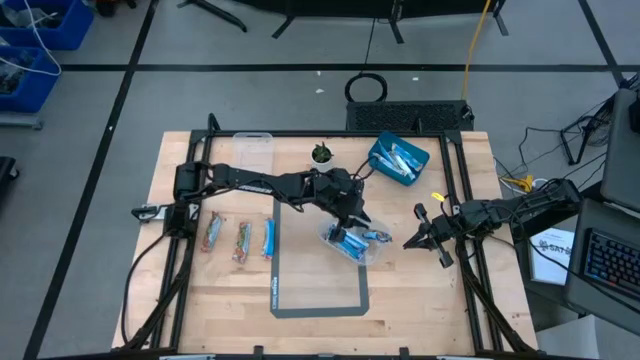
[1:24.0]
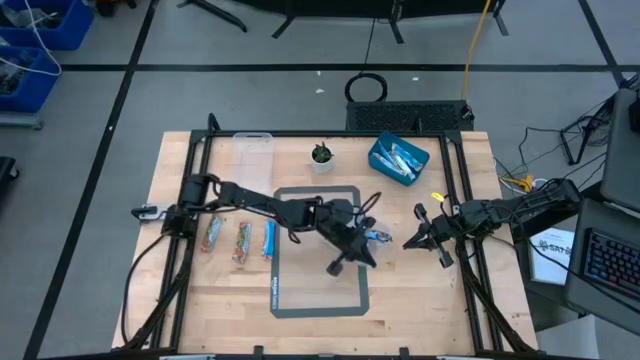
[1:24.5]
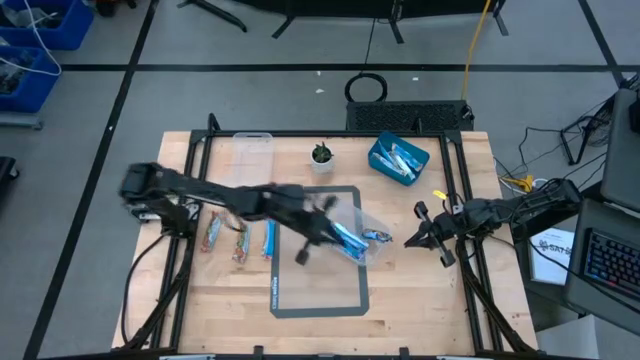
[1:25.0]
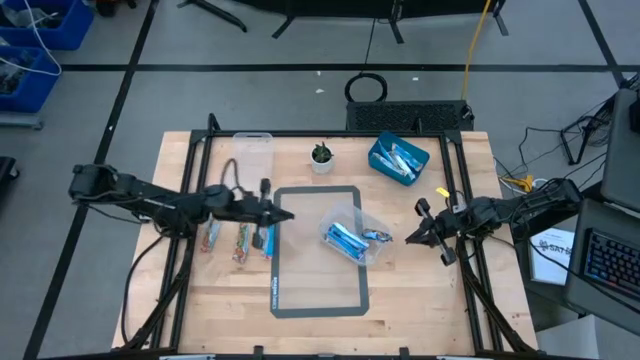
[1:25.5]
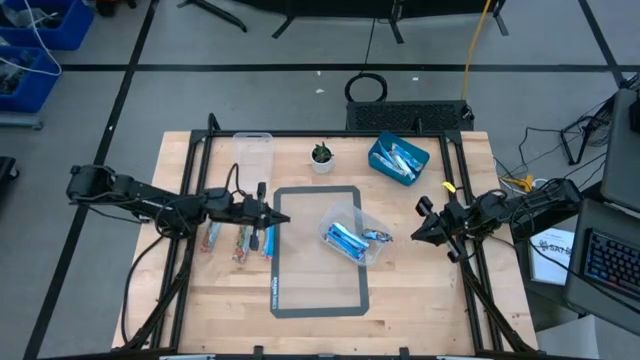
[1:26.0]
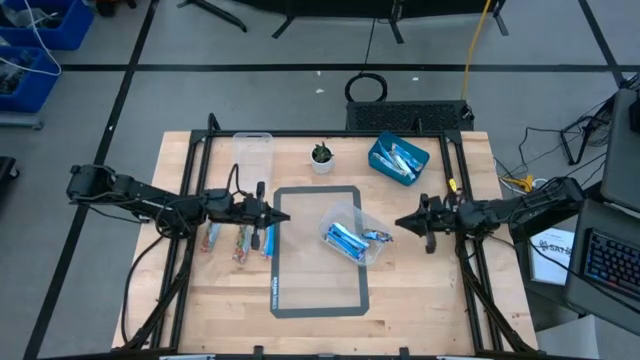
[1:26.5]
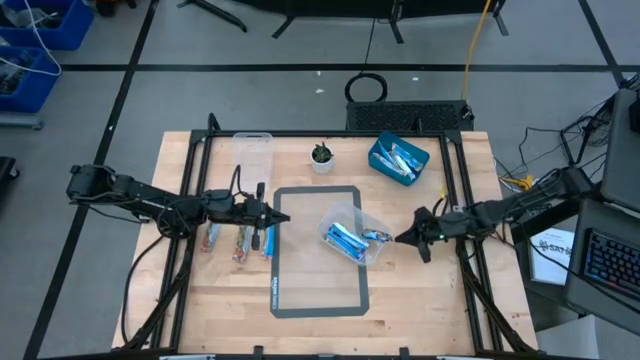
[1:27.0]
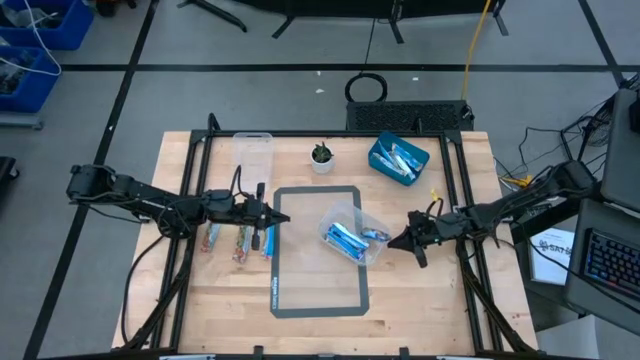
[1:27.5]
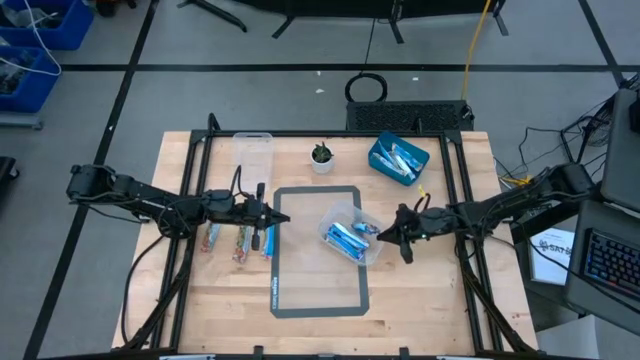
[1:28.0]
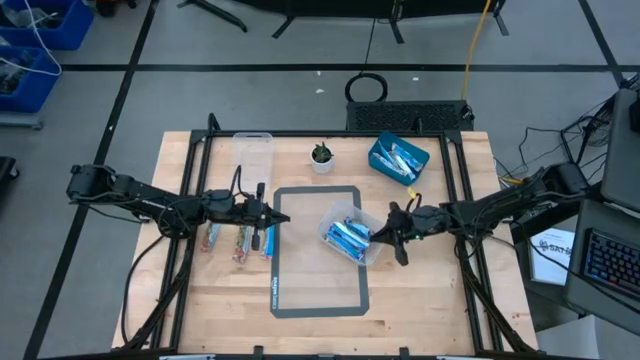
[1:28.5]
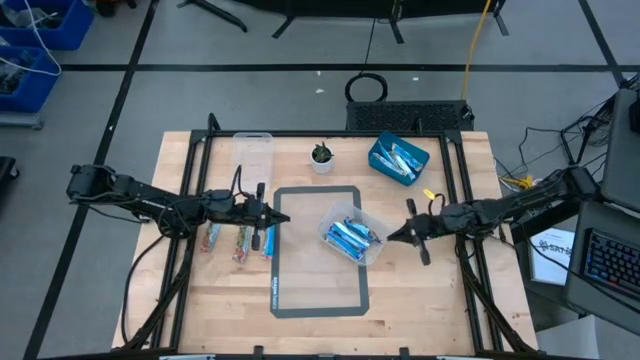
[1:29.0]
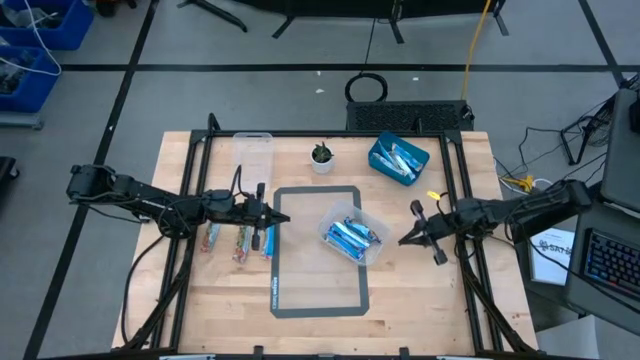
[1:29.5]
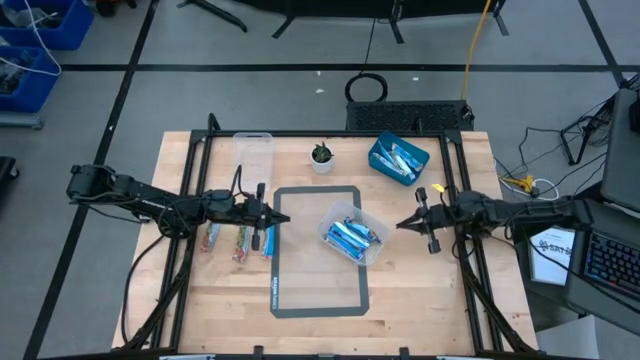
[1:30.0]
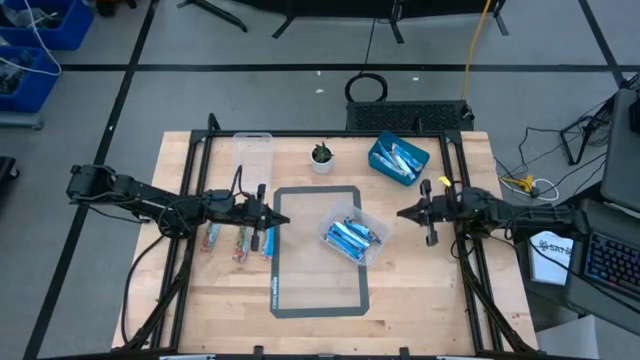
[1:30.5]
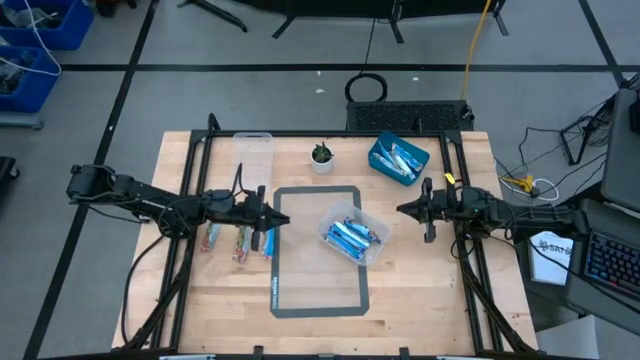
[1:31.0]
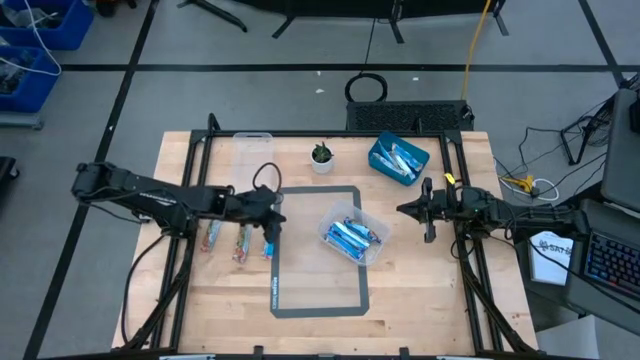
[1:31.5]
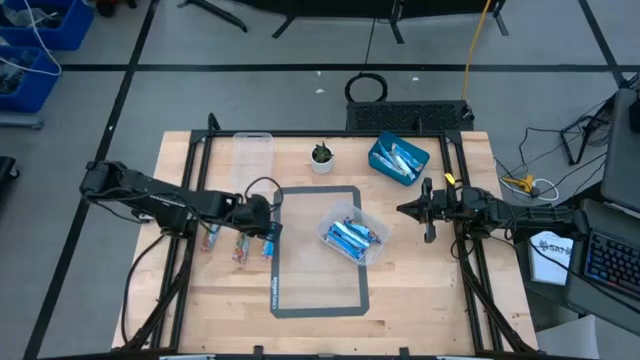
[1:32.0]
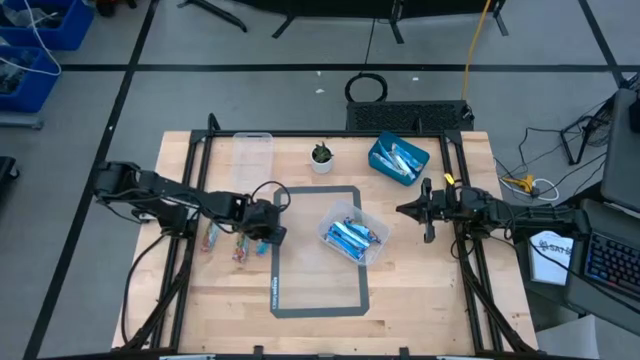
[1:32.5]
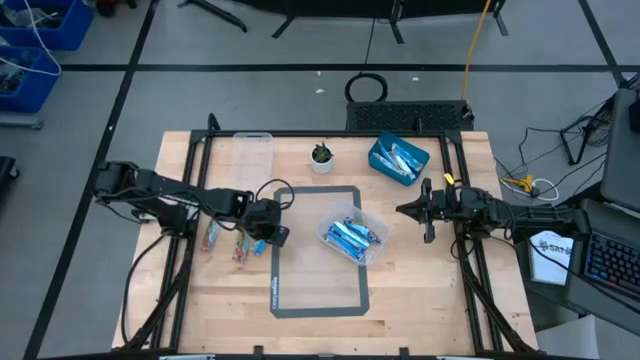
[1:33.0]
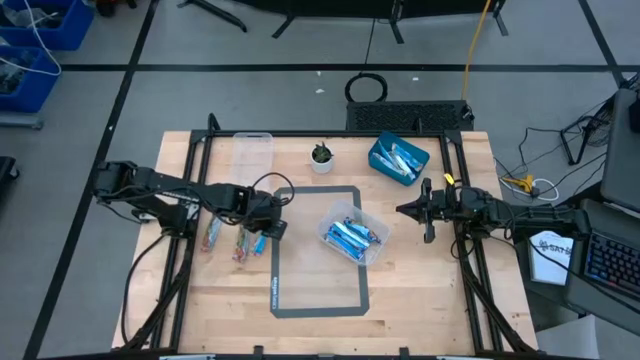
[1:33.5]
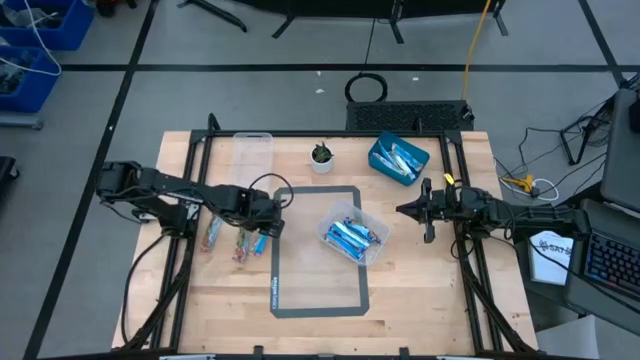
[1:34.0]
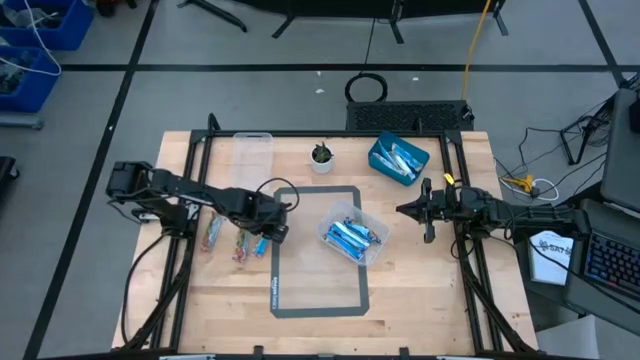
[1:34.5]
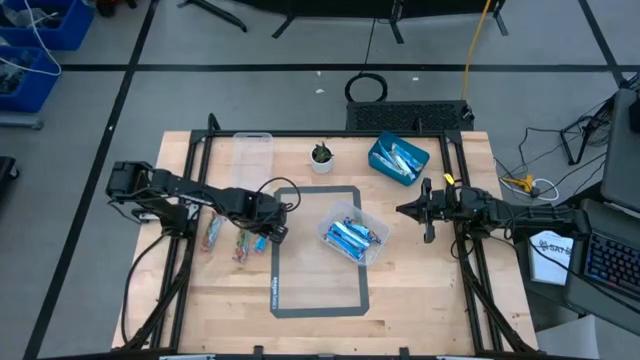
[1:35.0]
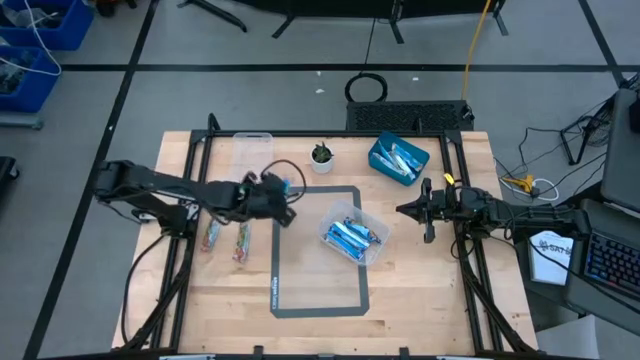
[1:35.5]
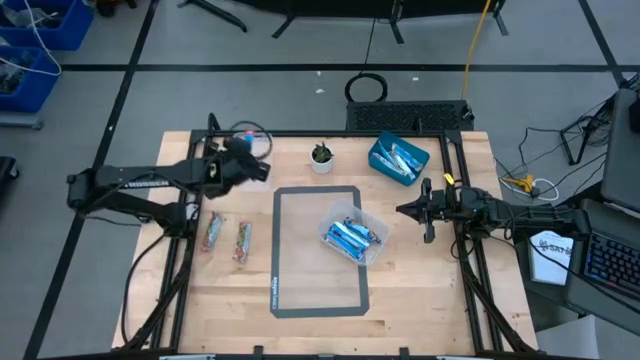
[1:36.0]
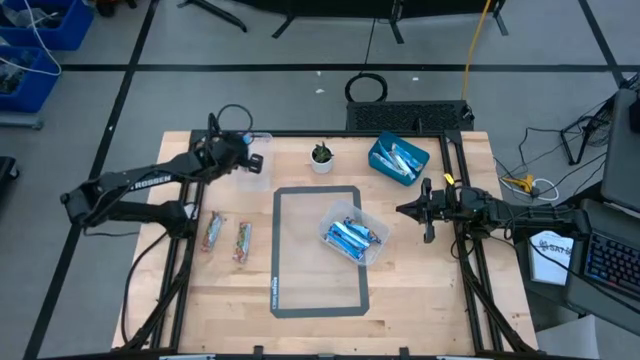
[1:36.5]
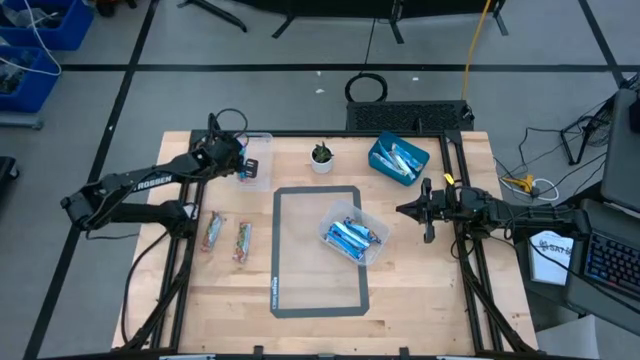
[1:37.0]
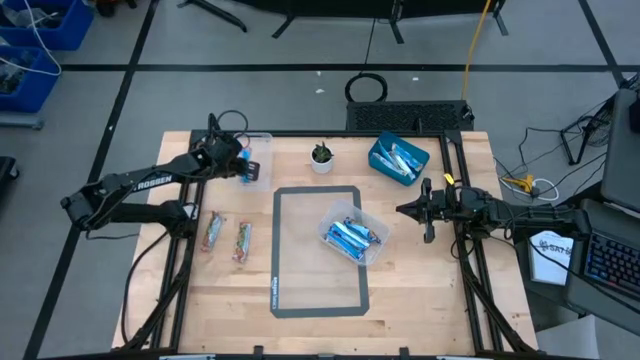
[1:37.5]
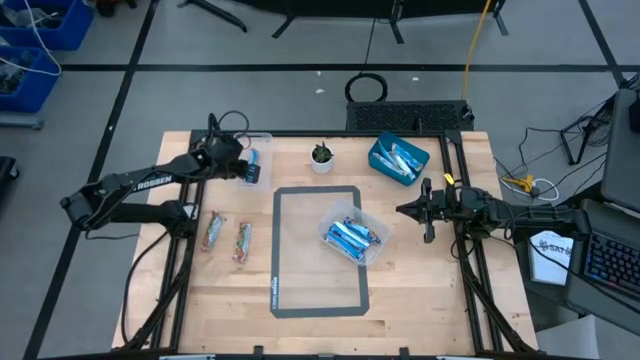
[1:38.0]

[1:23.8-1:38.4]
Task: Pick and place Granola Bars by type
Put the snack into the left bin

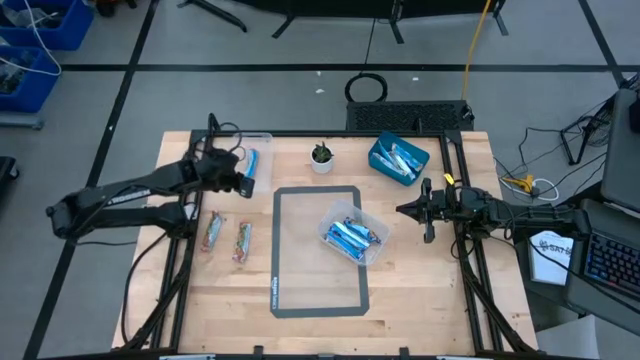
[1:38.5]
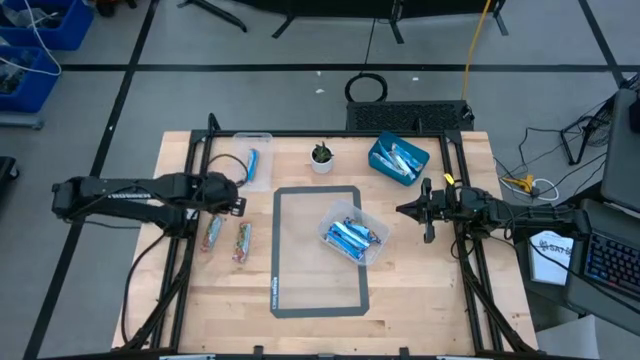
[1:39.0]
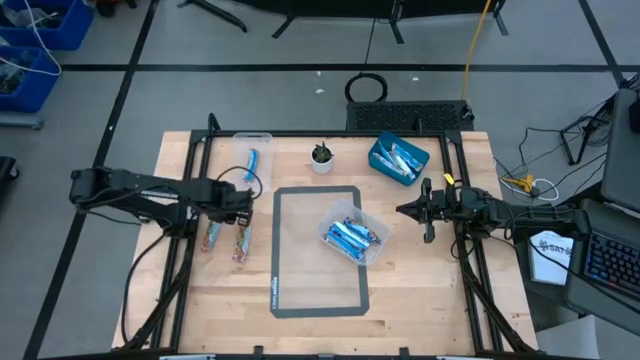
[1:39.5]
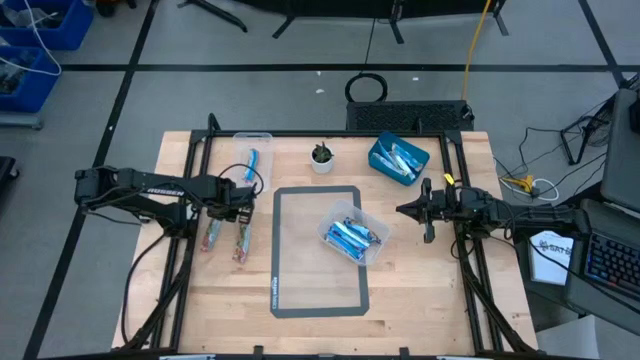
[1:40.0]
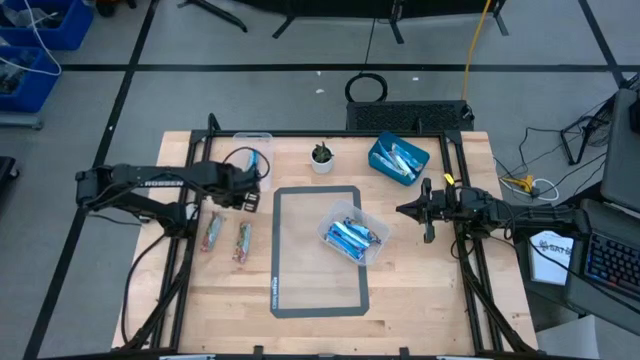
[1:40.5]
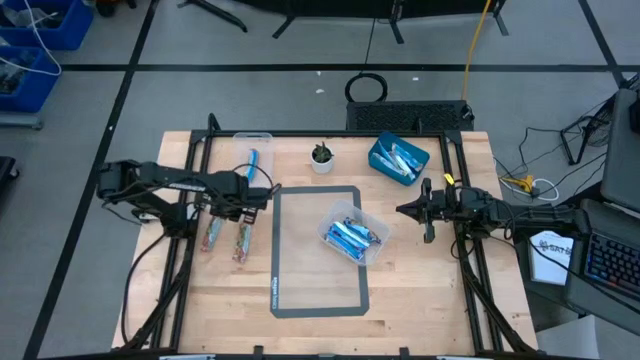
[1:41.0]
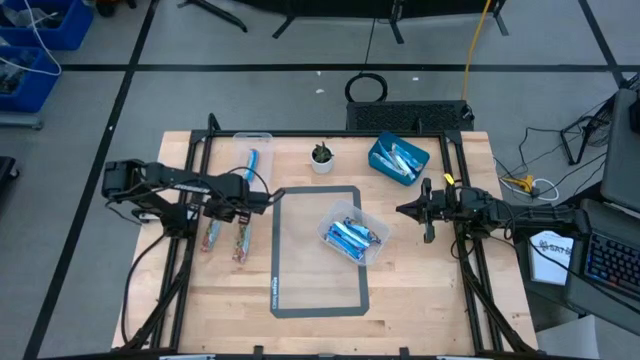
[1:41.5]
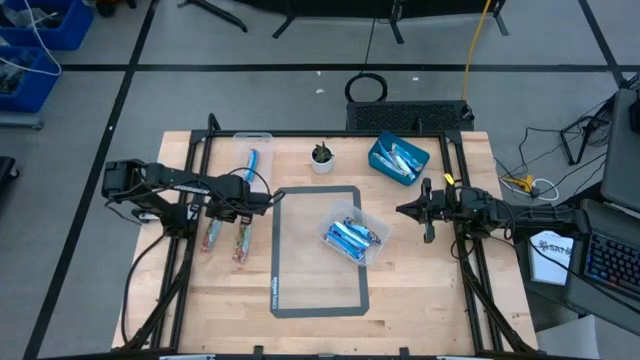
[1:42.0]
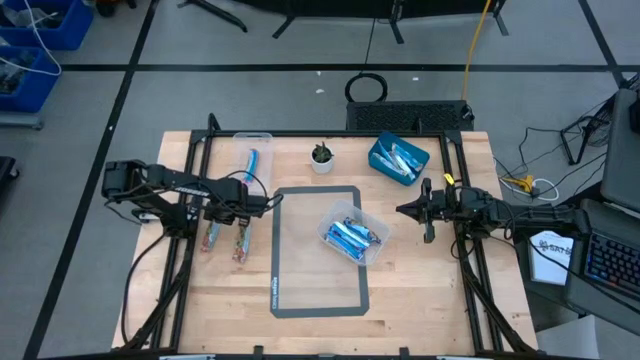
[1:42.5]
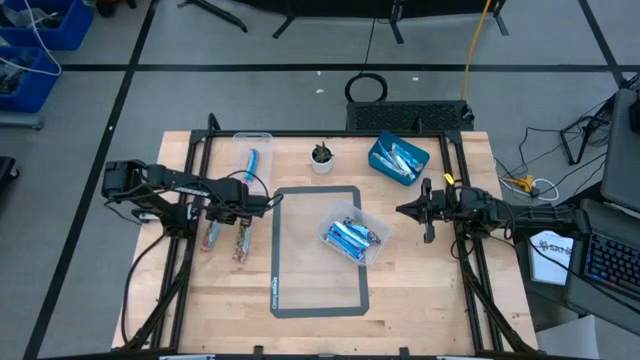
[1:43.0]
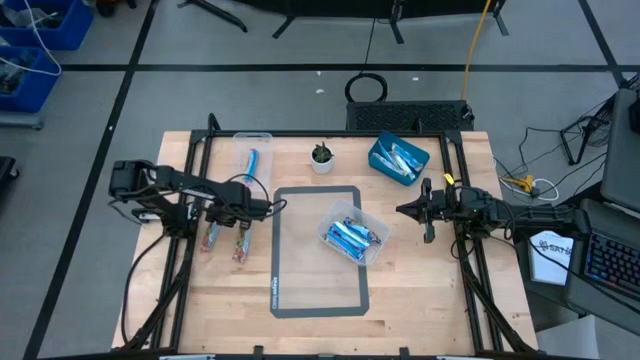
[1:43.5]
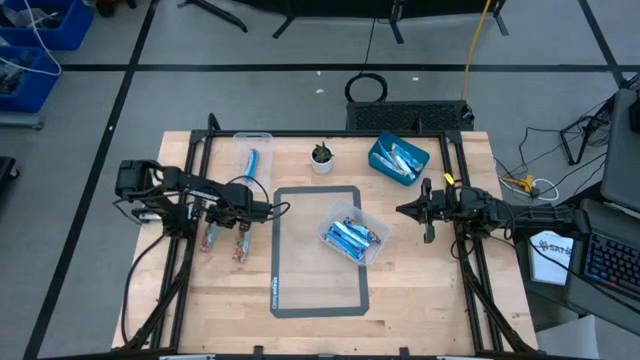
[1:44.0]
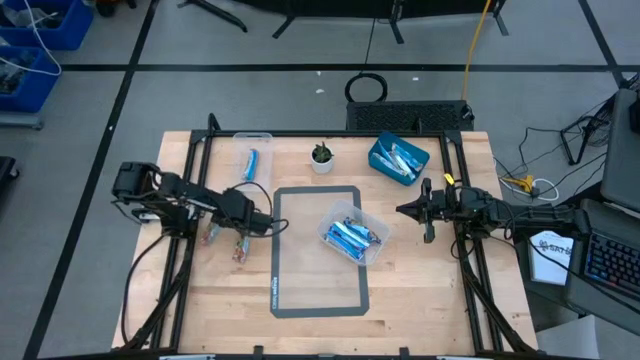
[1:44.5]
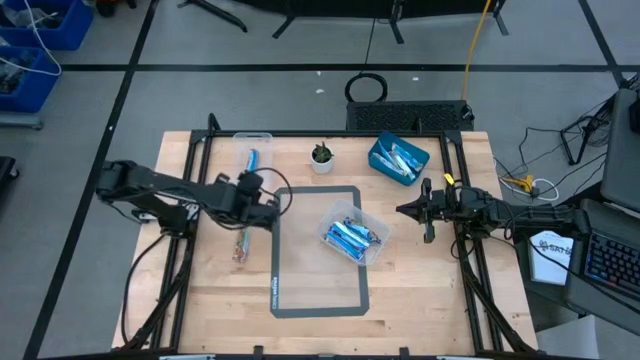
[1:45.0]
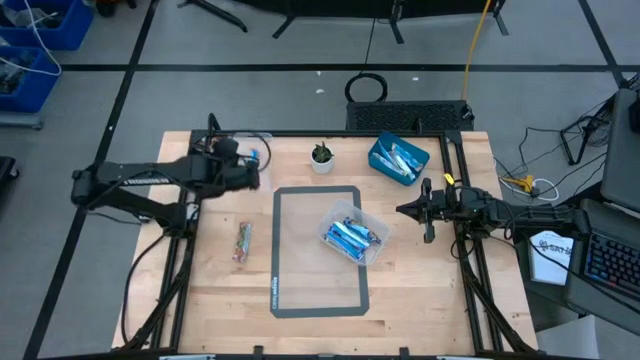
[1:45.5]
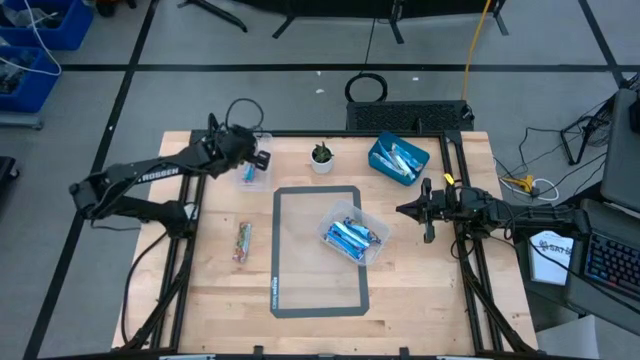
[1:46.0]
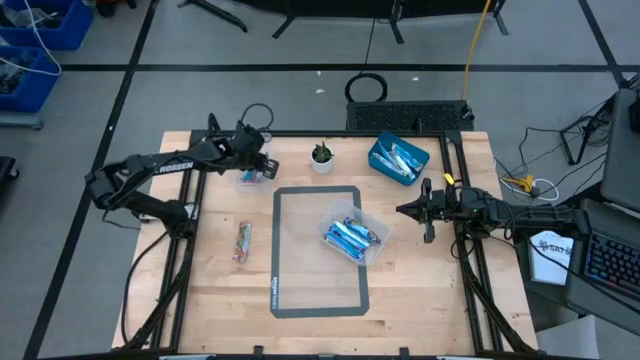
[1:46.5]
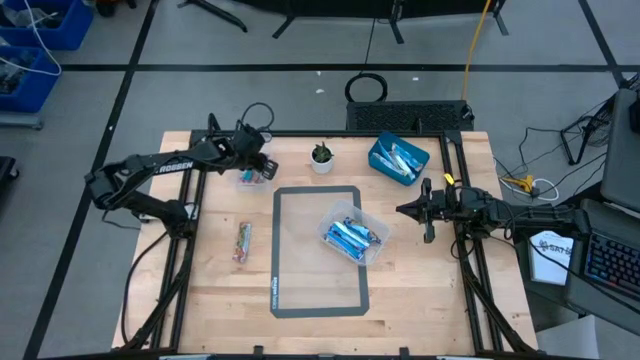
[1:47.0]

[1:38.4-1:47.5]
Put the snack into the left bin
